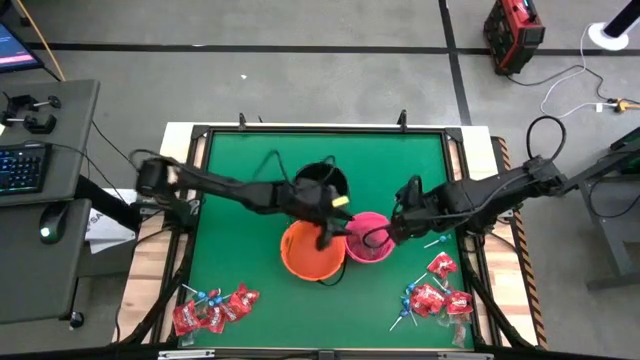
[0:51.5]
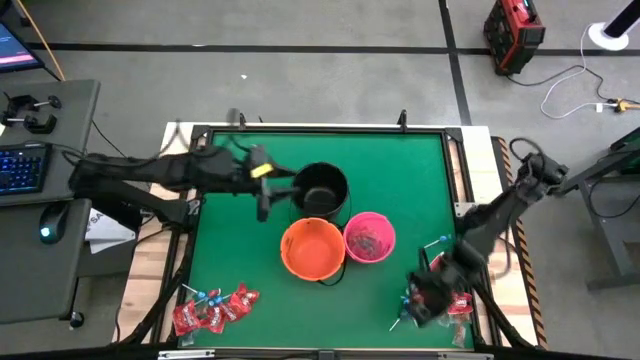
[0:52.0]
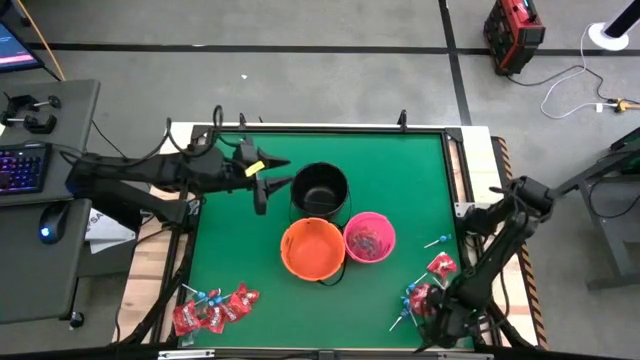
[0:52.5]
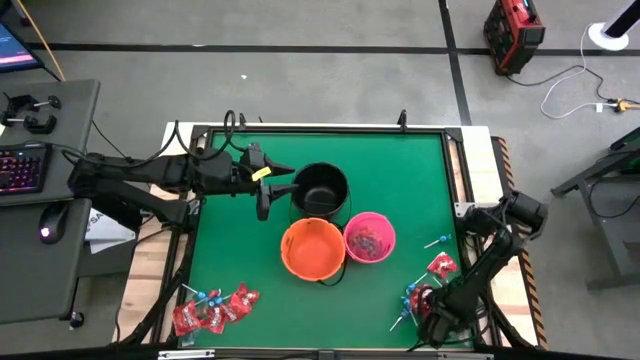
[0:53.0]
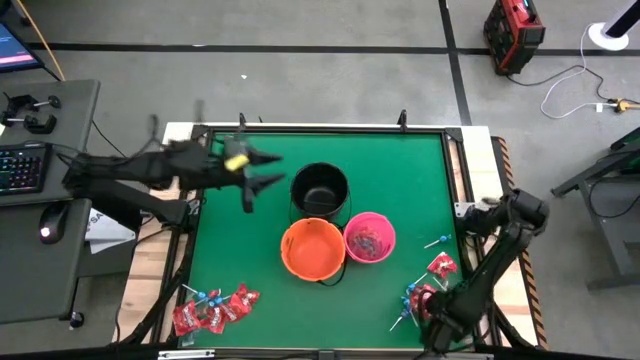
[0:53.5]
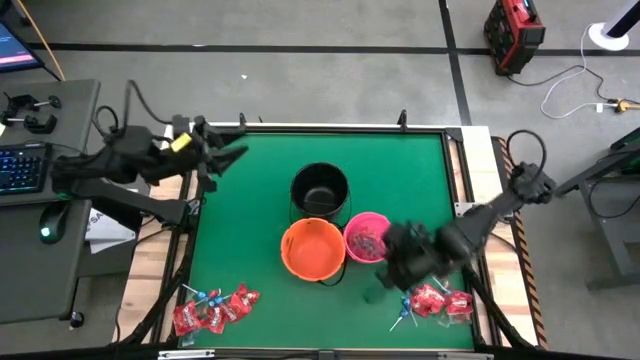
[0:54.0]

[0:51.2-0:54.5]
Task: Sort candy by brand, put in halloween buckets
Put the orange gummy into the pink bucket

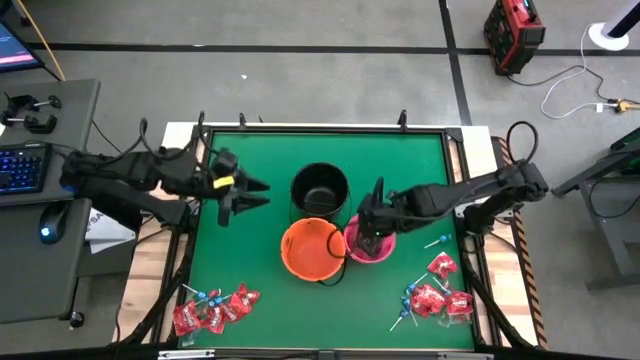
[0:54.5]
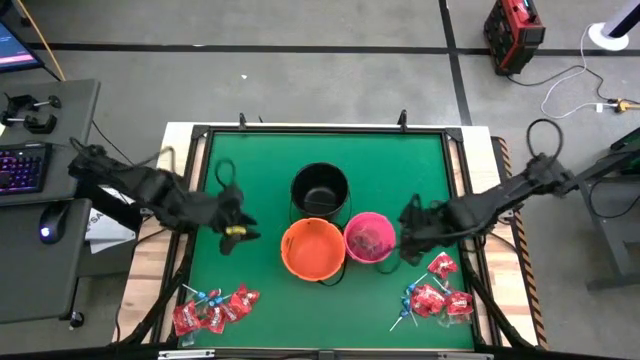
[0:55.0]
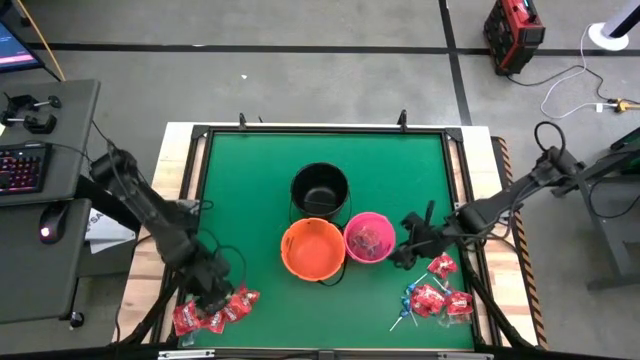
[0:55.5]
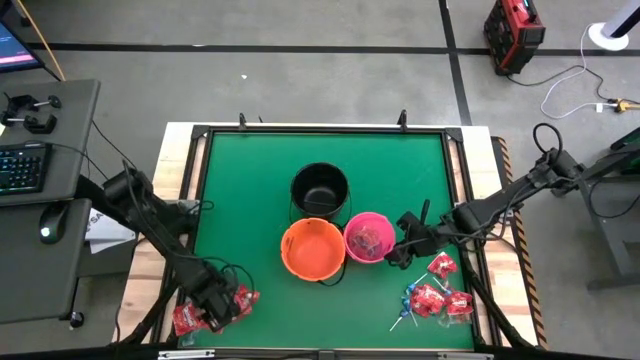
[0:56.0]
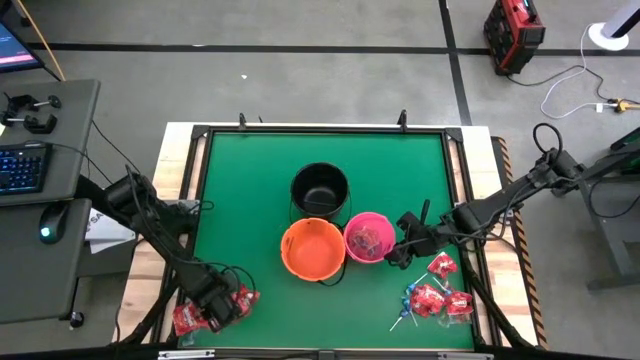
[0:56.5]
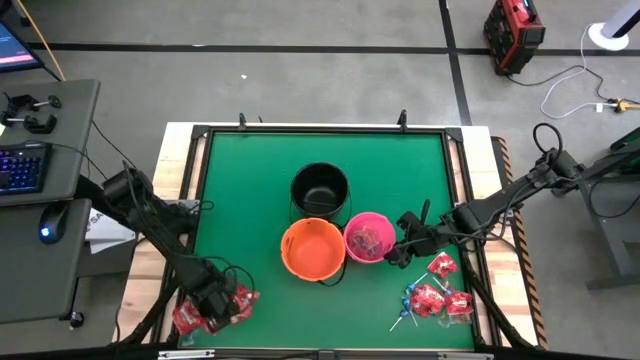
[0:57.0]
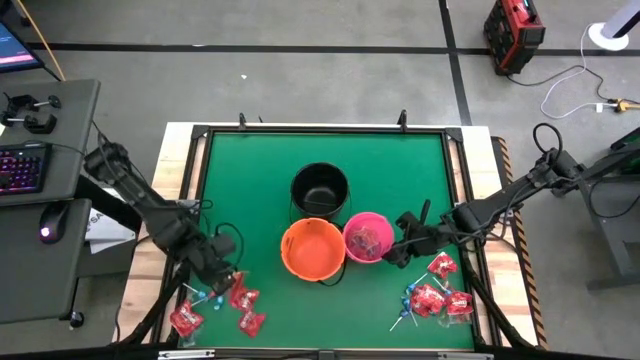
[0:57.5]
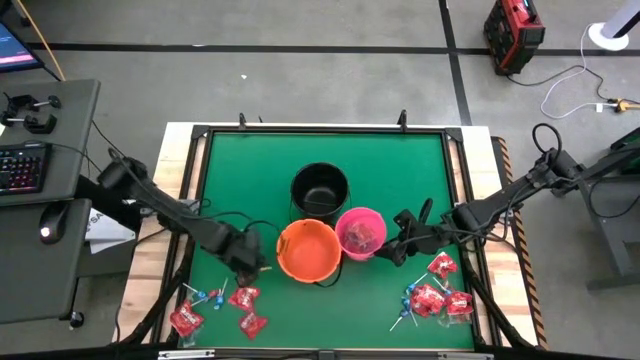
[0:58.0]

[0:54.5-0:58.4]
Put the orange gummy into the pink bucket

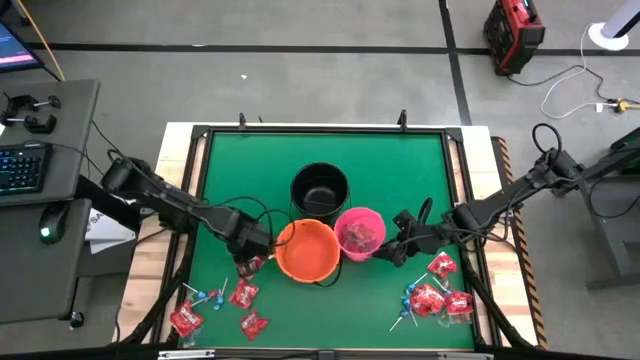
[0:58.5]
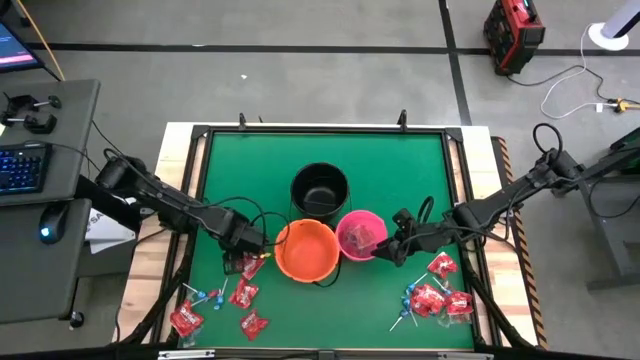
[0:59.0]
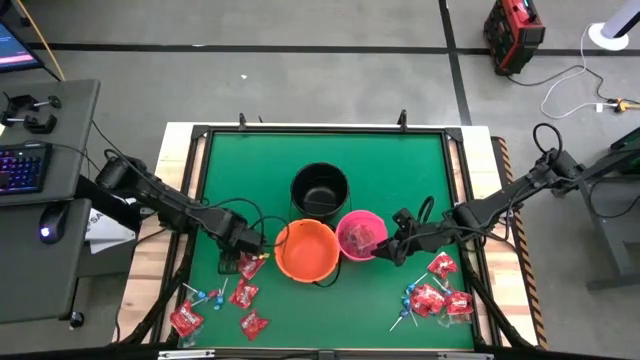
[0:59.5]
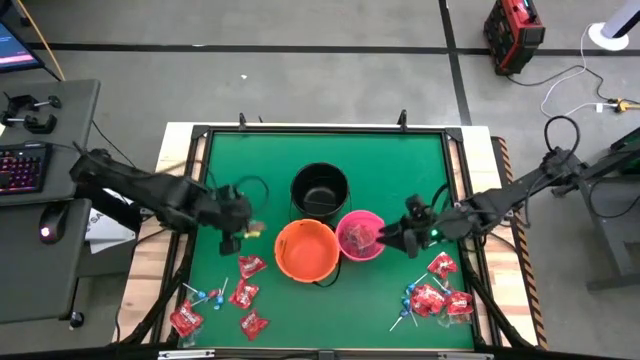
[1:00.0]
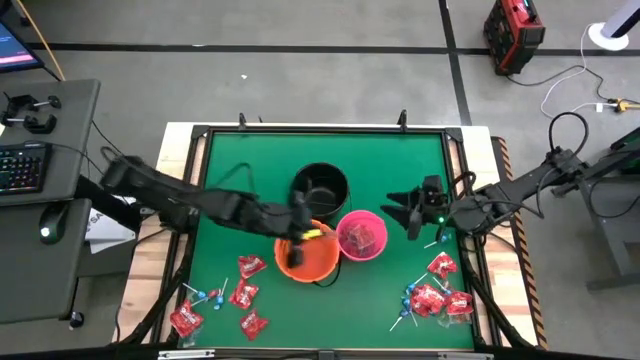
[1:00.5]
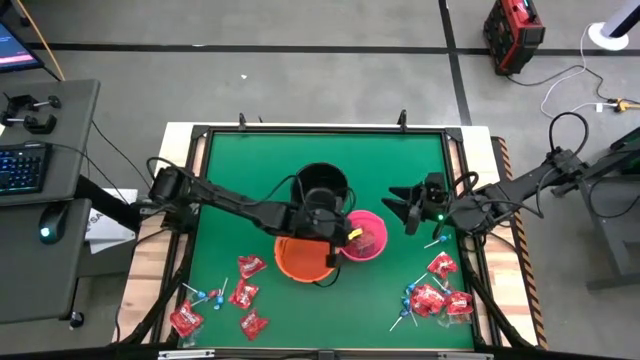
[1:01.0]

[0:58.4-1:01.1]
Put the orange gummy into the pink bucket

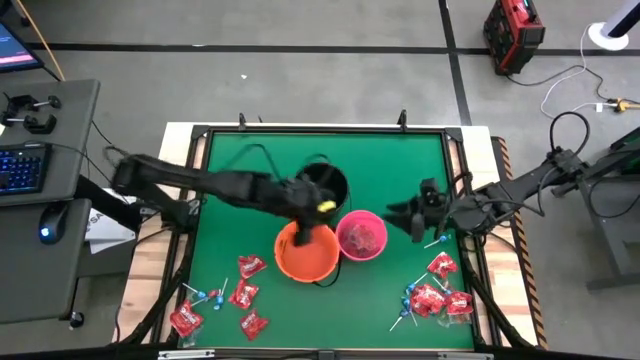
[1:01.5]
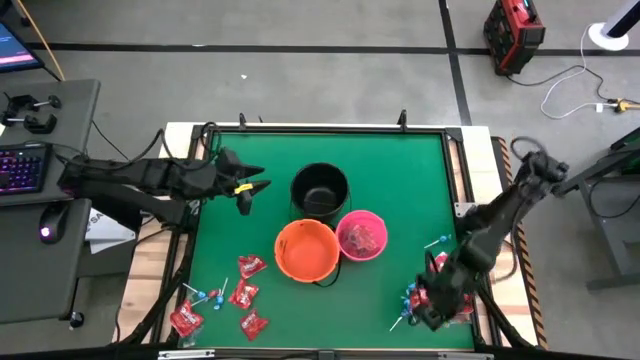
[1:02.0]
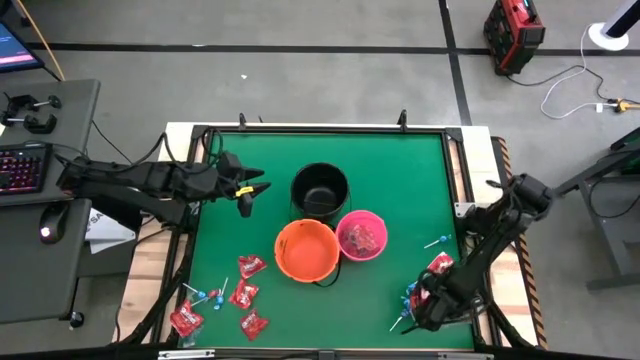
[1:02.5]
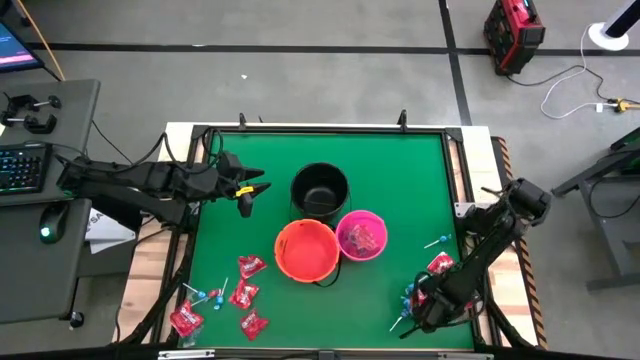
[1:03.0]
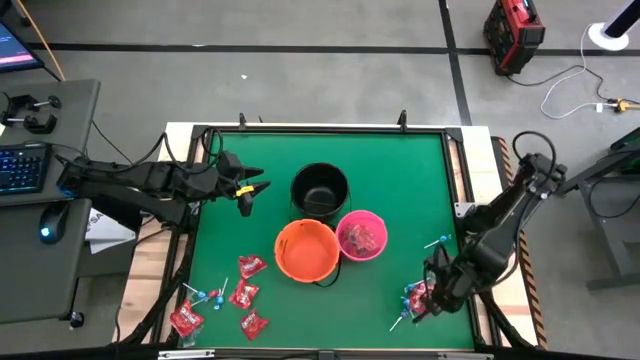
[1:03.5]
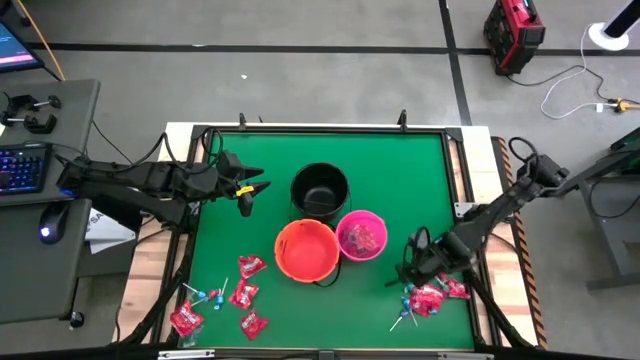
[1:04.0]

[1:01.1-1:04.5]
Put the green gummy into the pink bucket

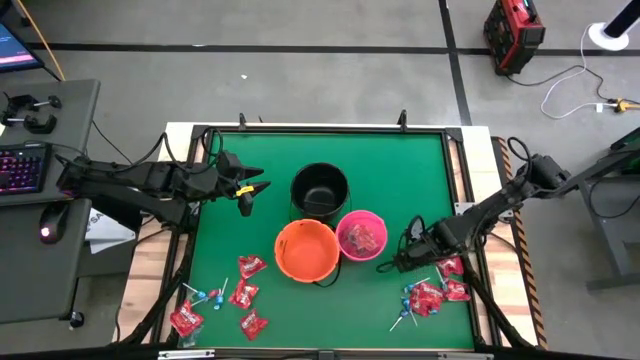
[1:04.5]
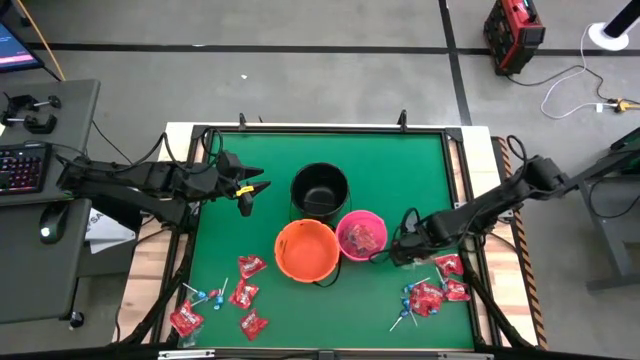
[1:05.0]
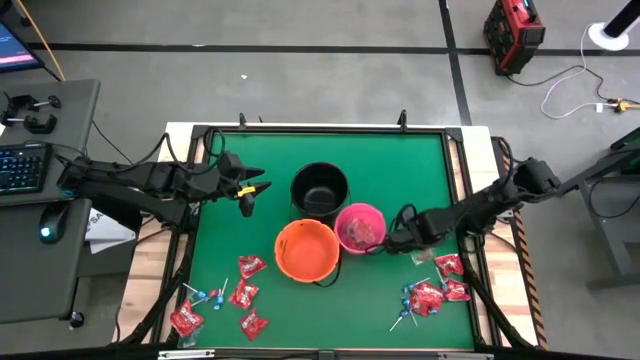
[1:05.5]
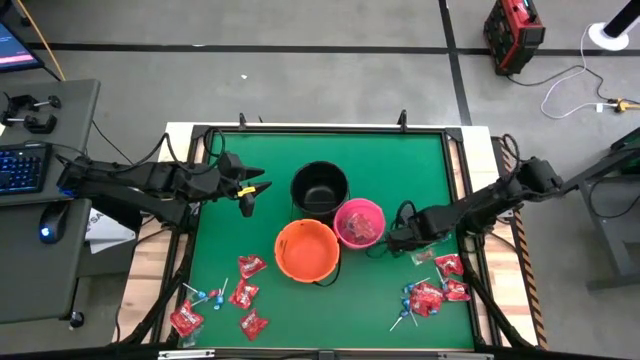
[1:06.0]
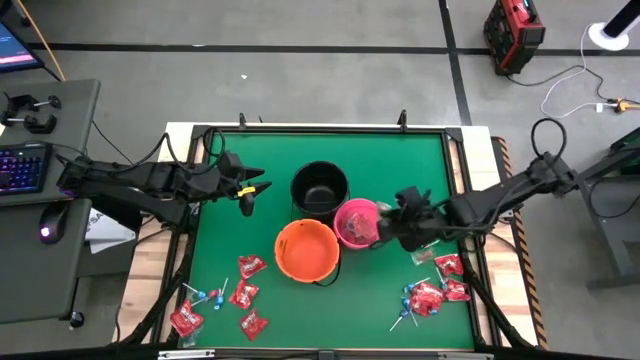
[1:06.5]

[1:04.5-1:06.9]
Put the green gummy into the pink bucket

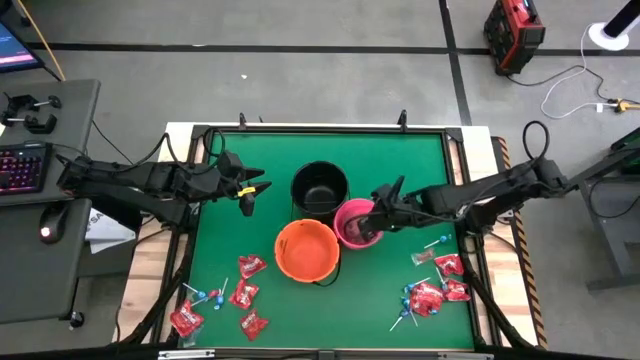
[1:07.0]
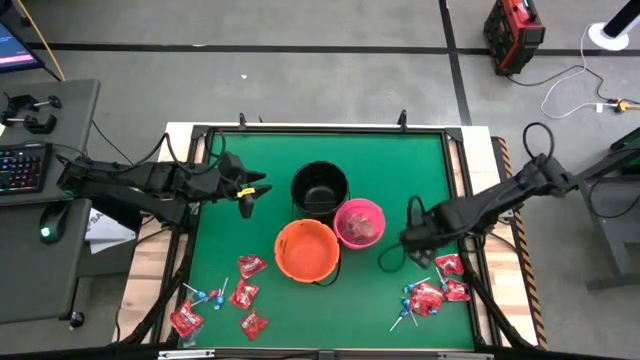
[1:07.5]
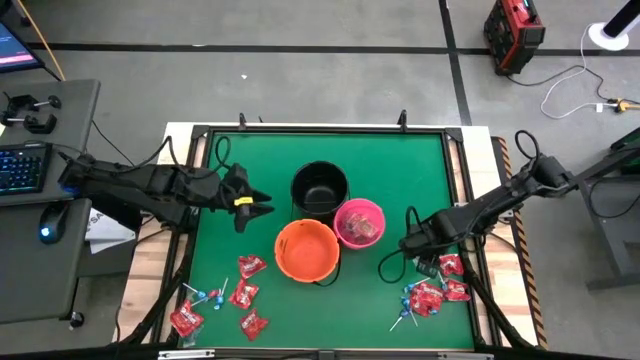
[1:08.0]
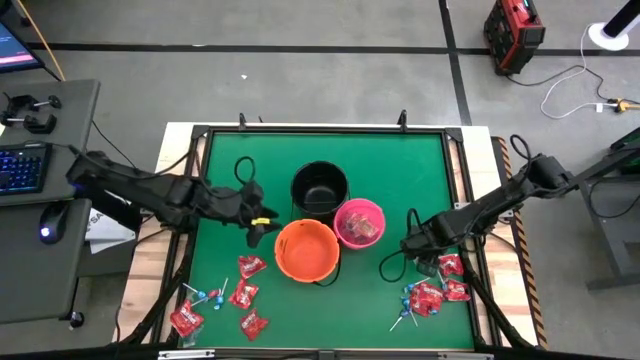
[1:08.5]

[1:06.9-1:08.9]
Put the orange gummy into the pink bucket

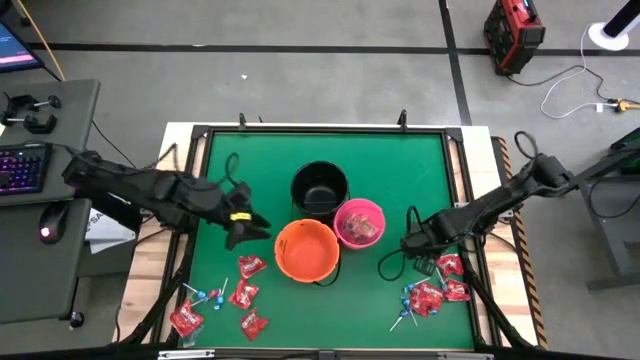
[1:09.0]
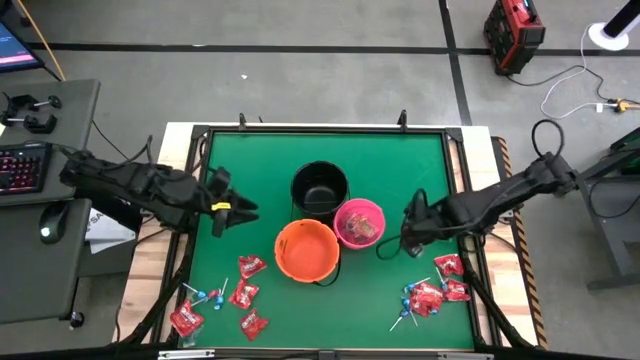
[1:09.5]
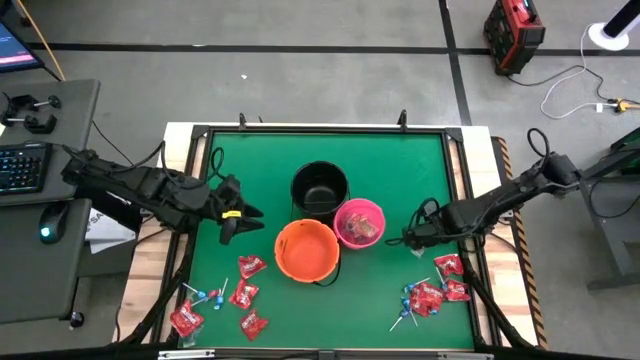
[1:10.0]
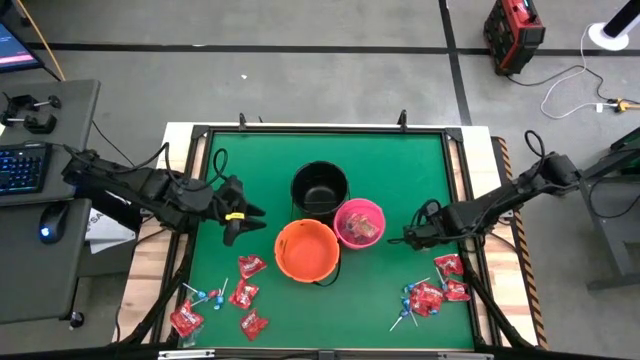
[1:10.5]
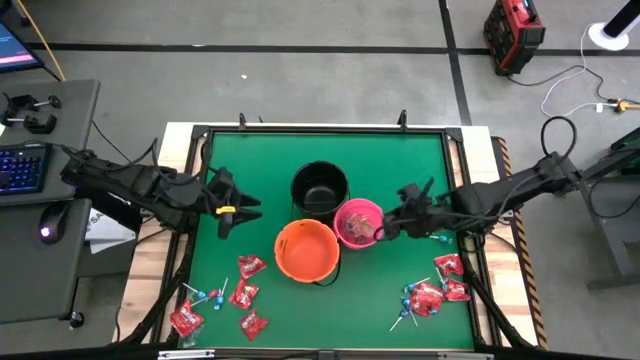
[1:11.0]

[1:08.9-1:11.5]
Put the orange gummy into the pink bucket

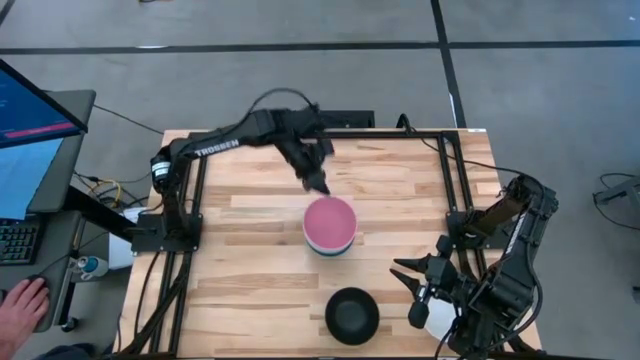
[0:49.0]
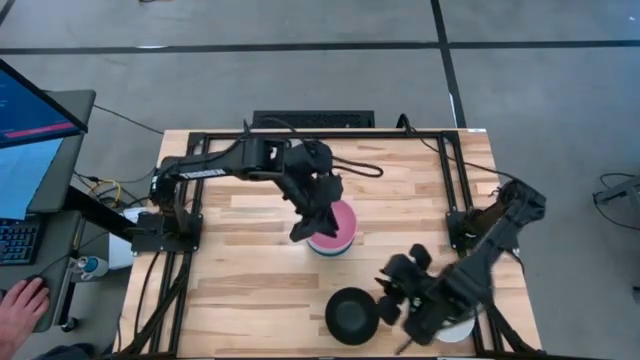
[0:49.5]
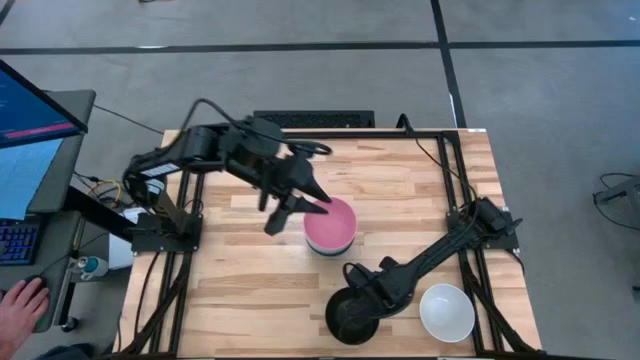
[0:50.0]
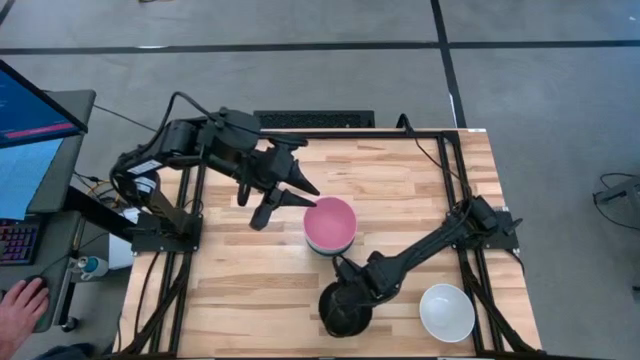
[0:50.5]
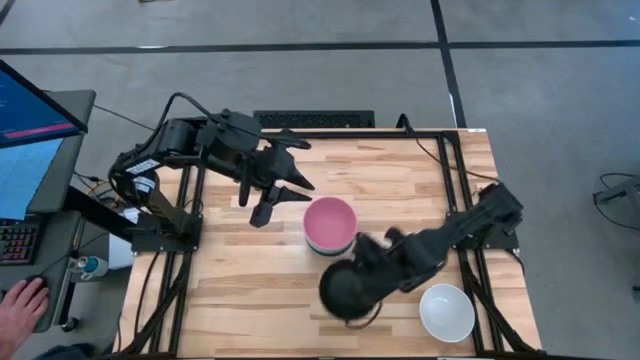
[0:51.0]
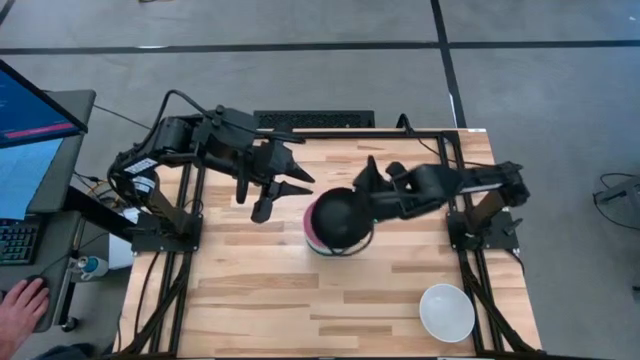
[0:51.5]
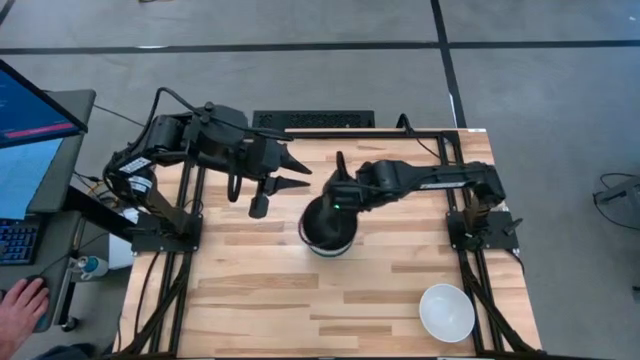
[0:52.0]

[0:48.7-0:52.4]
Task: Nest bowls inside each other
Stack the black bowl on top of the pink bowl
